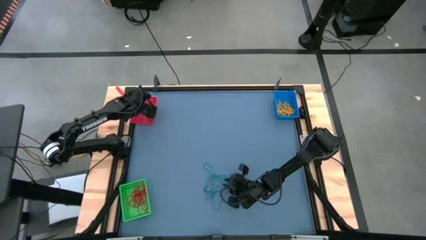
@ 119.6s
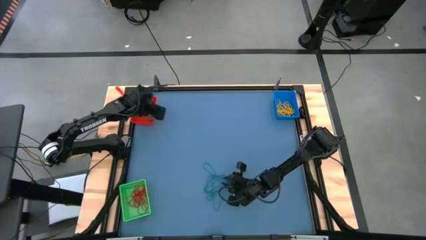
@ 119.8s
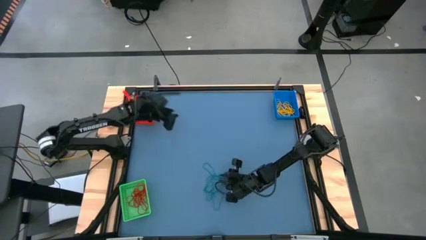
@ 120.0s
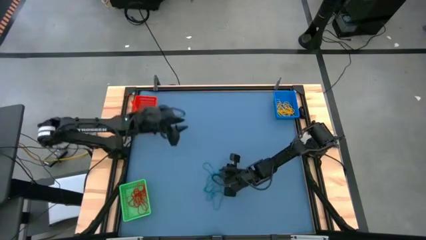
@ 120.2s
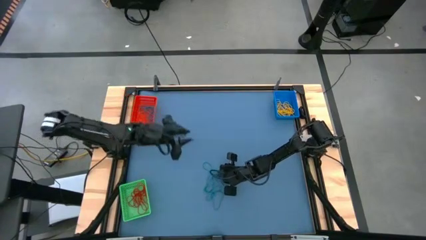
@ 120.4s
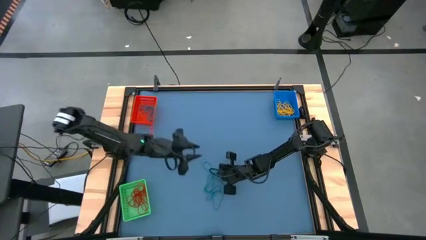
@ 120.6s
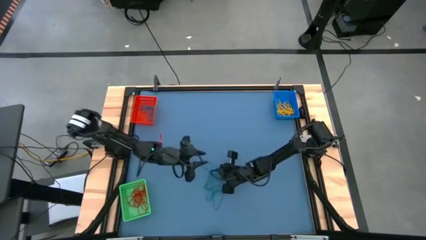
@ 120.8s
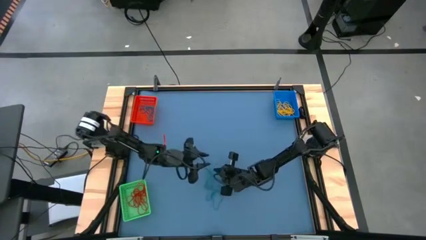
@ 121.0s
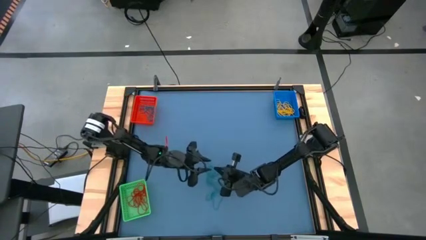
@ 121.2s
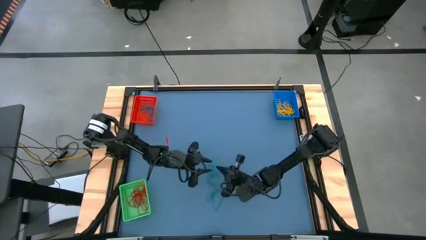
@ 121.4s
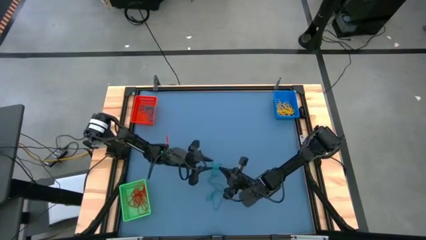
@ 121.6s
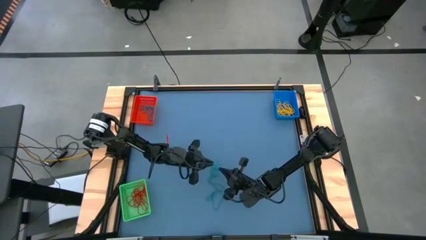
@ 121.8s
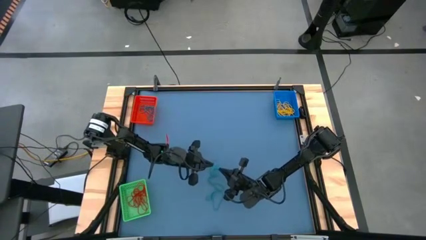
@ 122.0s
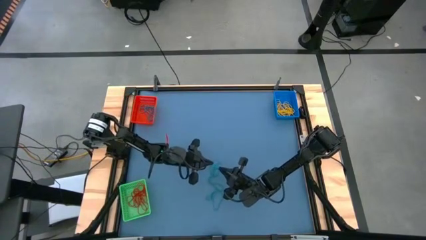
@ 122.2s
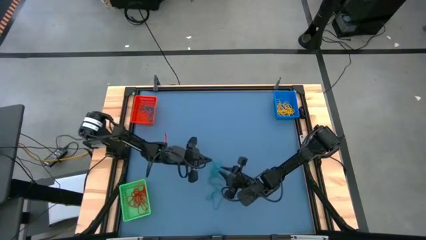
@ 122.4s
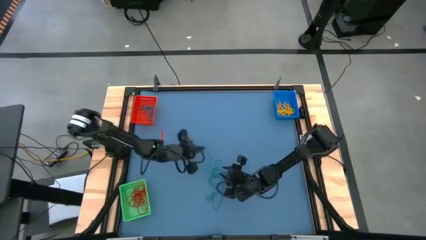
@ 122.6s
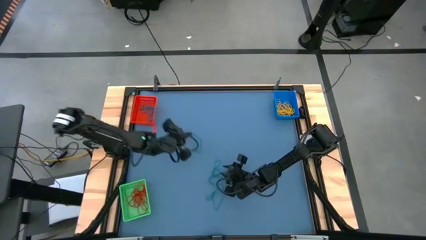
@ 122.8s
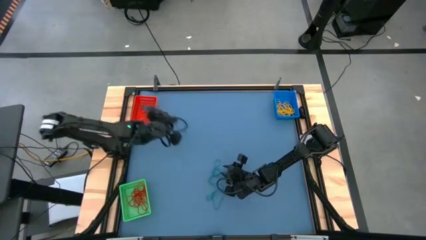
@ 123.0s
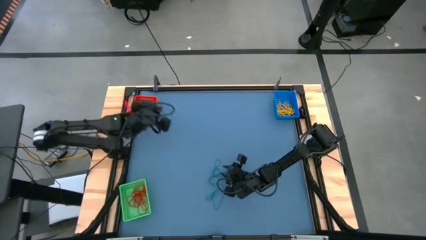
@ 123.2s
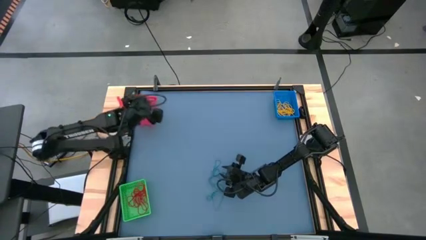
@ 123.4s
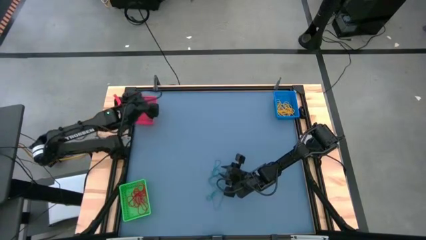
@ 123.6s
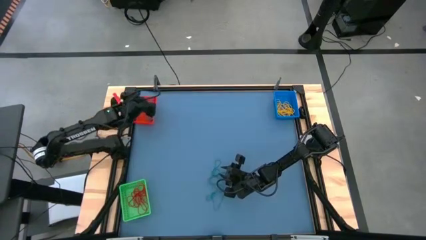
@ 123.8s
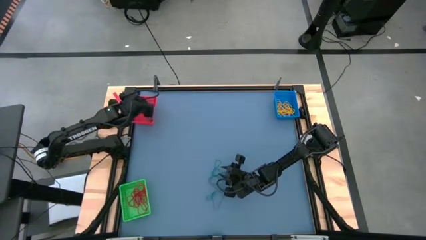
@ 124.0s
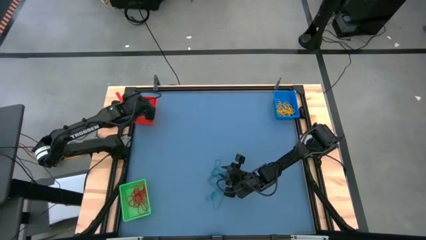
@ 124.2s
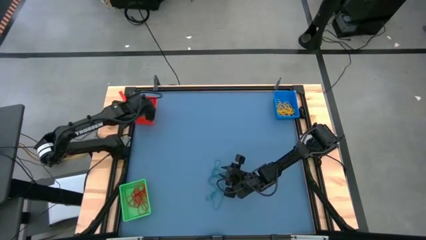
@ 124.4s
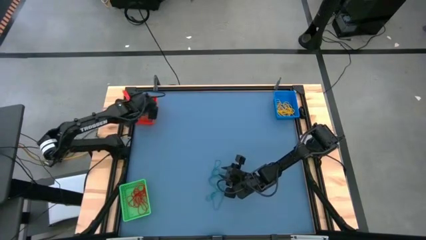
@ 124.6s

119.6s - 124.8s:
Task: Sort rubber bands into baskets
Put the blue rubber band into the red basket

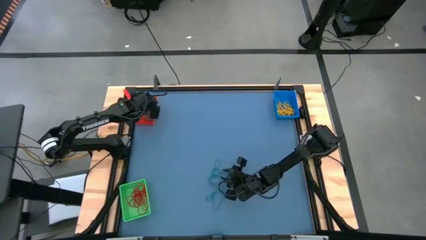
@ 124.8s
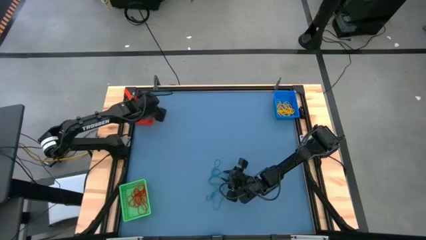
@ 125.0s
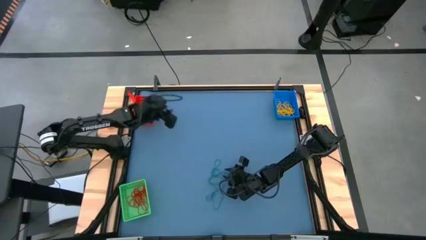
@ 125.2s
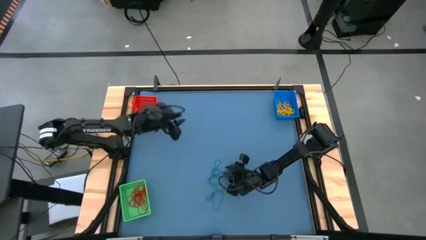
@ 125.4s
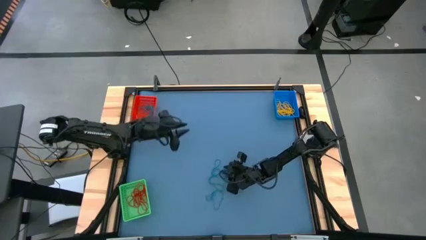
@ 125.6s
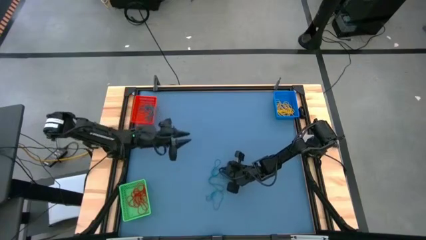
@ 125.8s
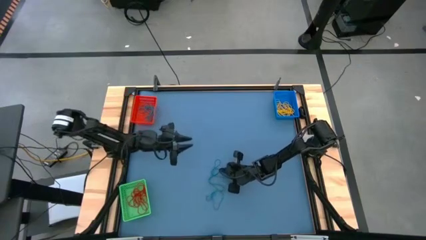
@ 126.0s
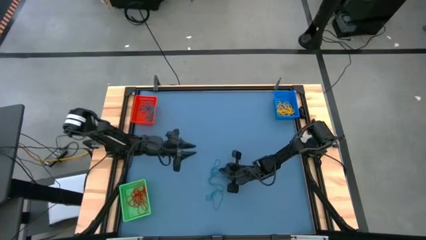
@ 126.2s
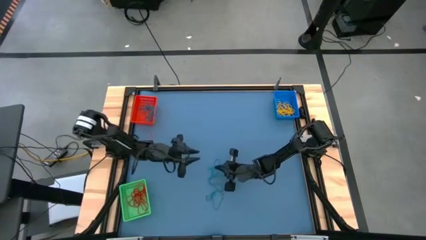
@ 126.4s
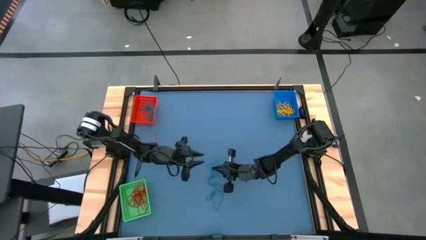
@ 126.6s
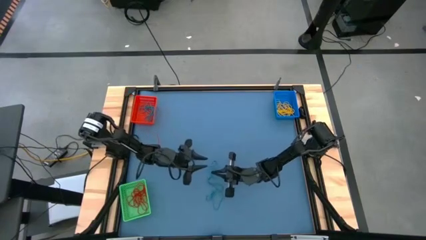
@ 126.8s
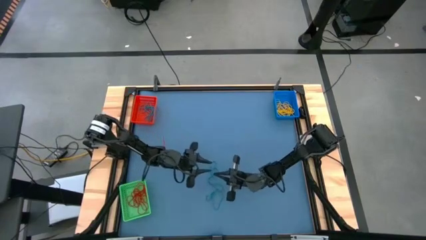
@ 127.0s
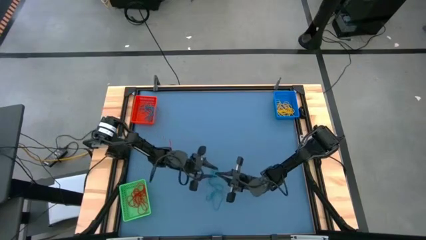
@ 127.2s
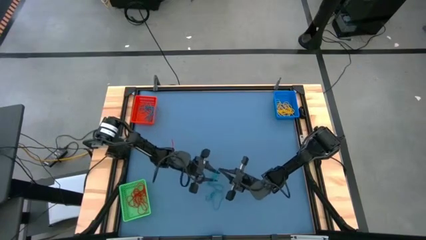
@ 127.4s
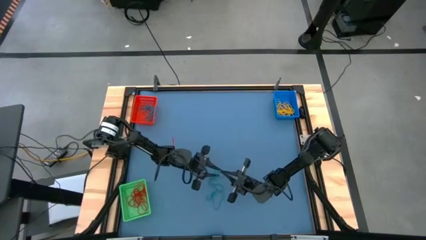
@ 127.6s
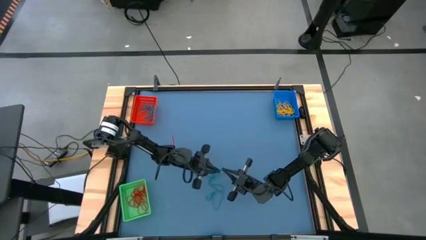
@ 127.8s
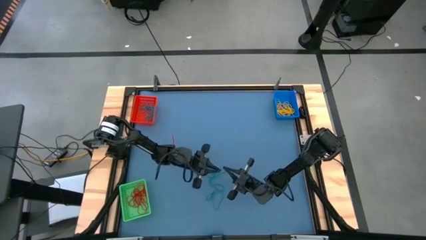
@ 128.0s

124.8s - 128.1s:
Put the blue rubber band into the red basket

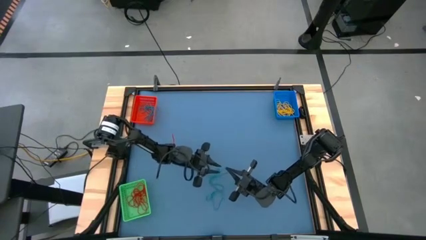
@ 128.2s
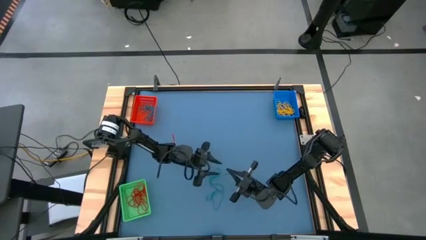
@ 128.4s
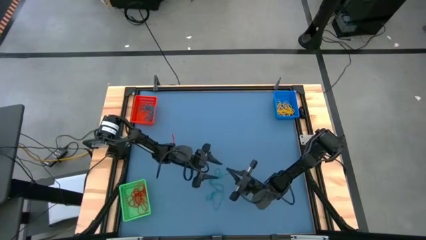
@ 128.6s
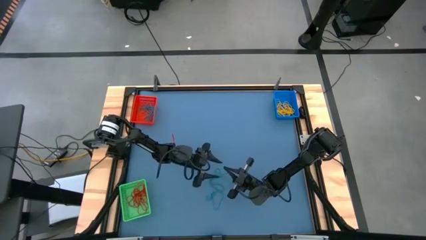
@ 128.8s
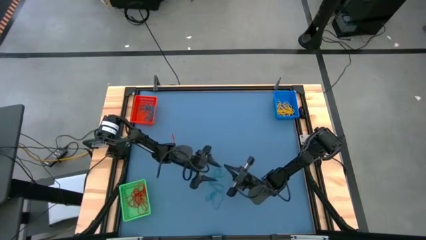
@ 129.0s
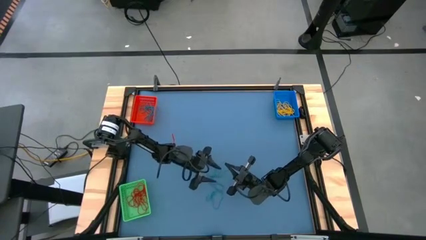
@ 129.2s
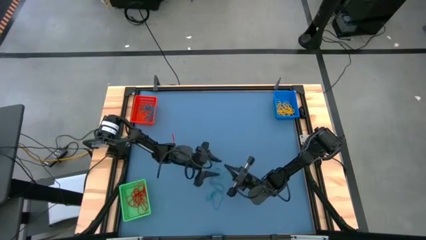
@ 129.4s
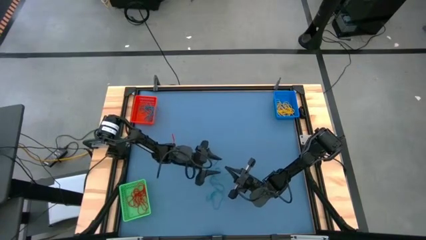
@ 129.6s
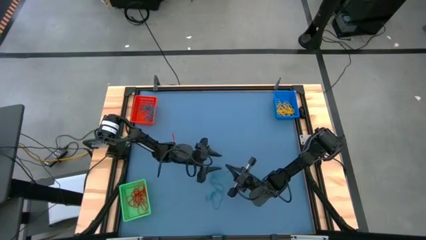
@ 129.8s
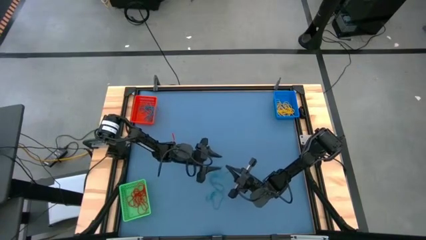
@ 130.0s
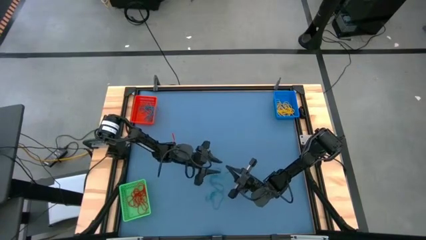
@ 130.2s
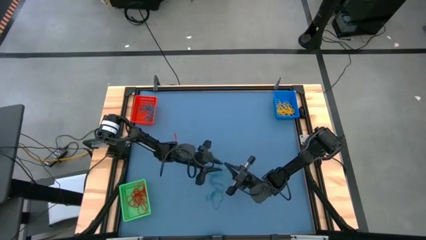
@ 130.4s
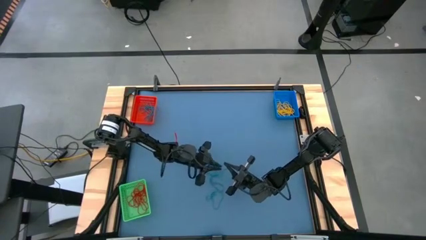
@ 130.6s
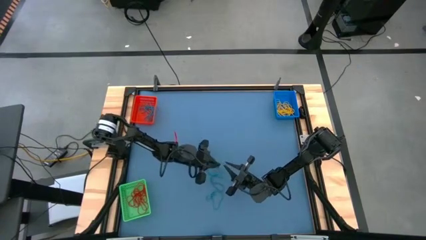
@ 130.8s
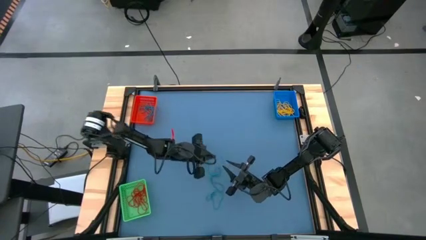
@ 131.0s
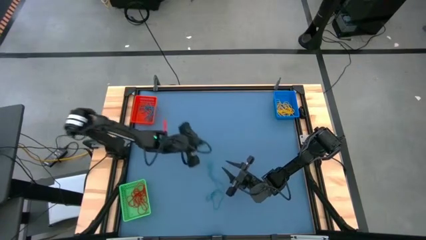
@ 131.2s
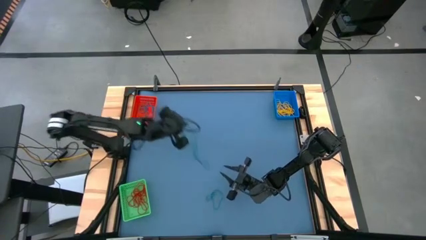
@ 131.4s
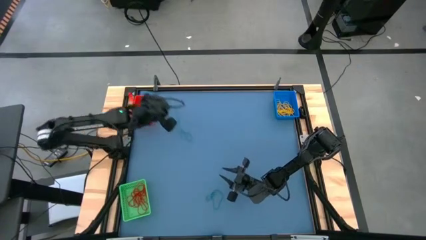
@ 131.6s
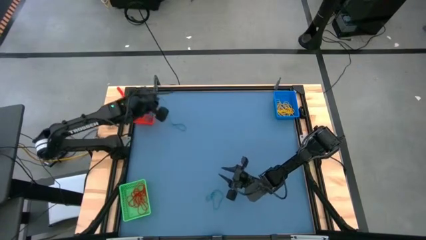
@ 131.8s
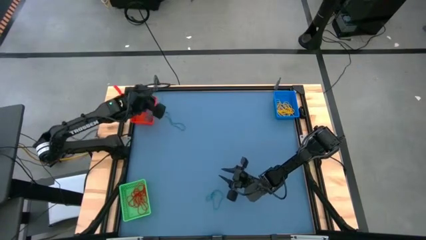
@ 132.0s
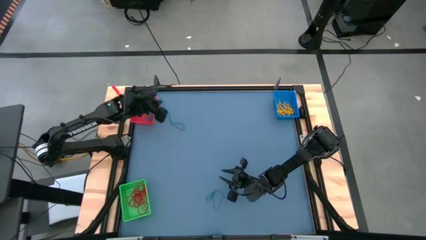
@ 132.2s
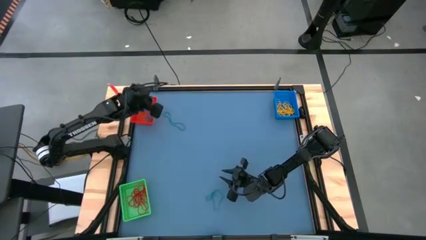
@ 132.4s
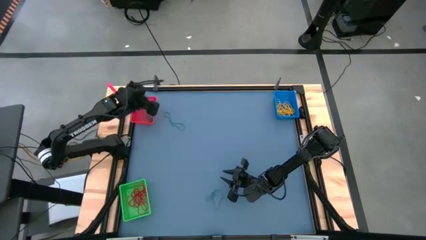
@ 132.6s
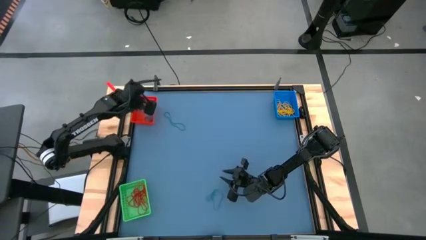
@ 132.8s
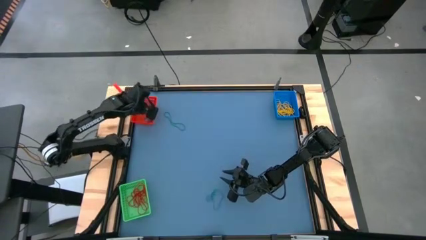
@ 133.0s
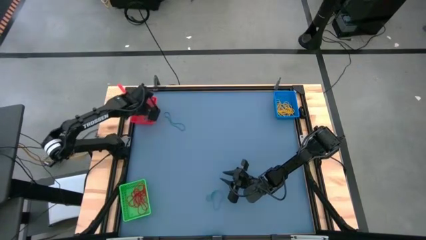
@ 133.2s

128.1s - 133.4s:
Put the blue rubber band into the red basket

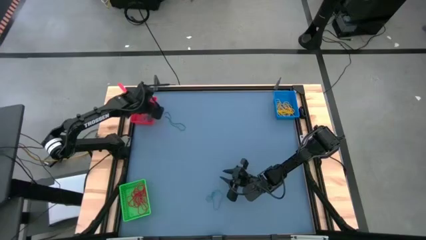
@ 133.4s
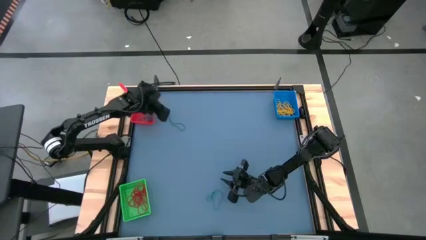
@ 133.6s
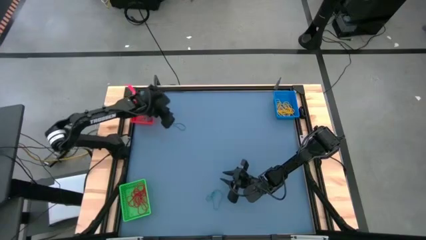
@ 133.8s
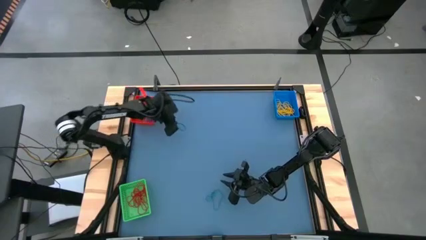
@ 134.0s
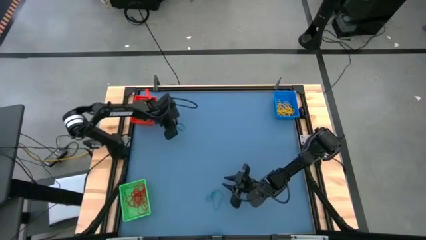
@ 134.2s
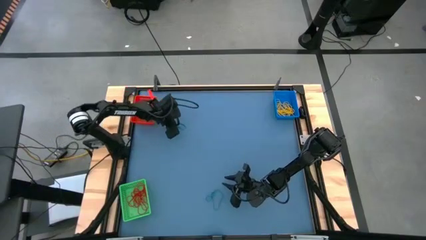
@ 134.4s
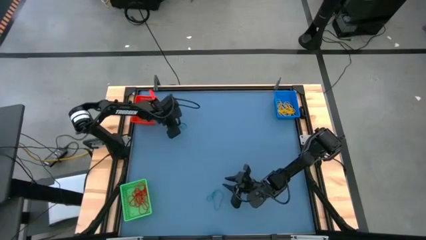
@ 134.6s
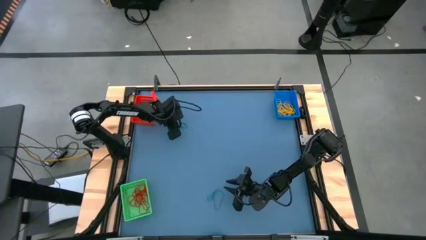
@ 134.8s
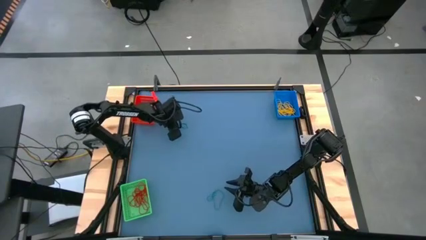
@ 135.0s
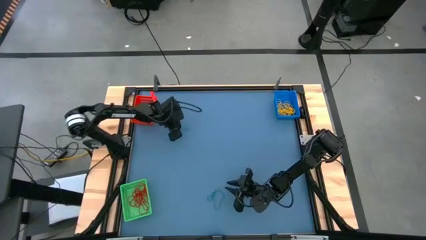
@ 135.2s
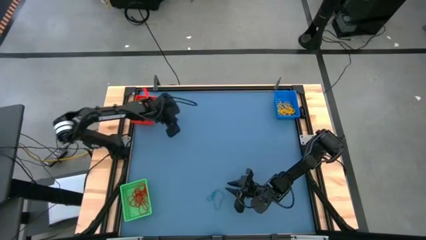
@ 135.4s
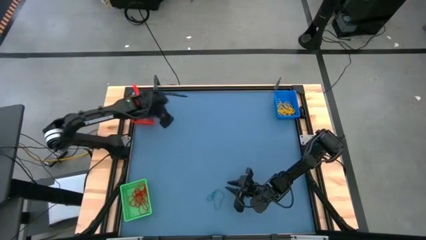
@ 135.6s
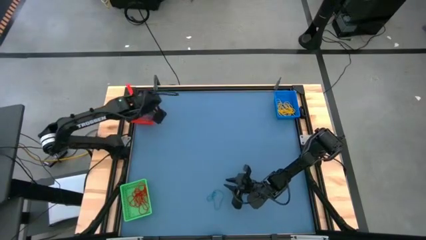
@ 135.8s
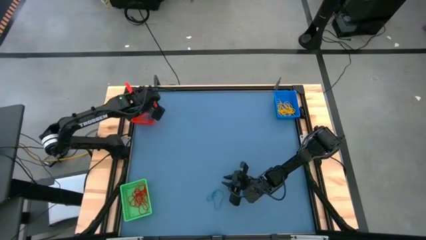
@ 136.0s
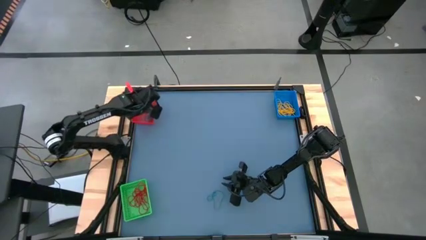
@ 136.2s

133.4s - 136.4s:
Put the blue rubber band into the red basket
